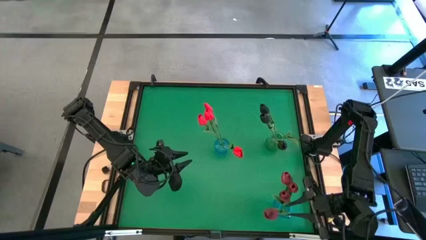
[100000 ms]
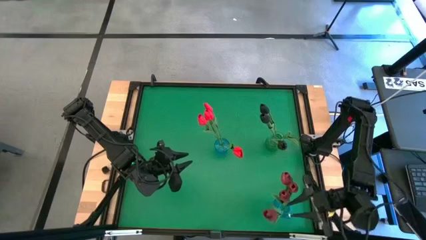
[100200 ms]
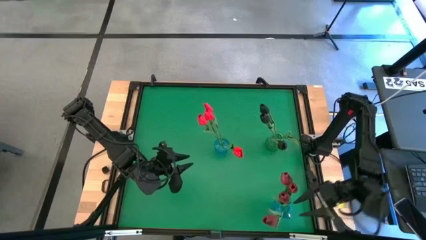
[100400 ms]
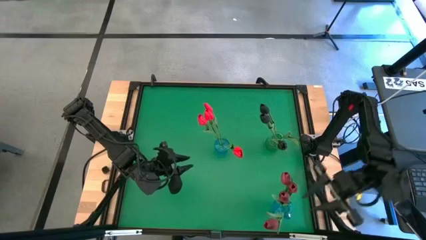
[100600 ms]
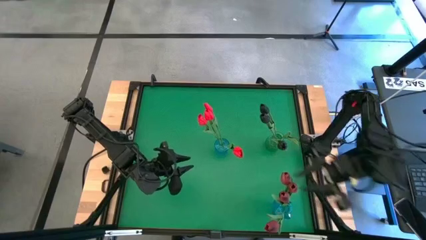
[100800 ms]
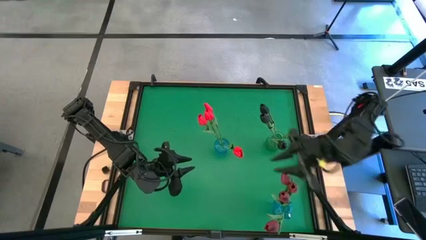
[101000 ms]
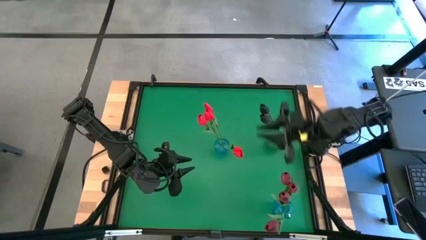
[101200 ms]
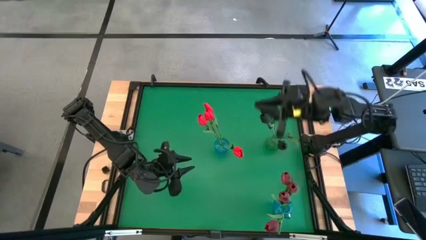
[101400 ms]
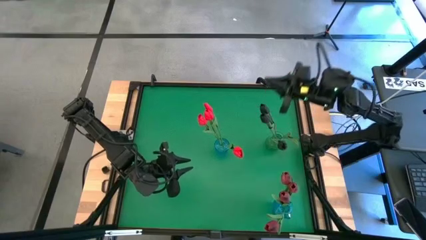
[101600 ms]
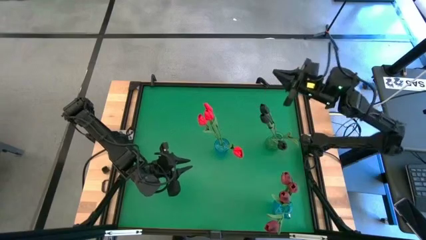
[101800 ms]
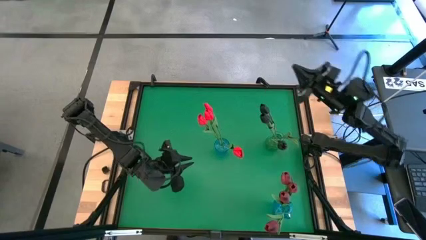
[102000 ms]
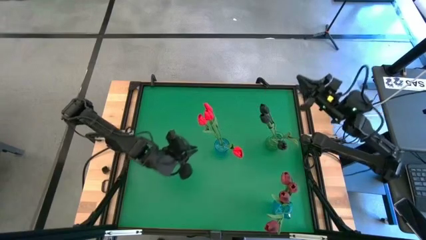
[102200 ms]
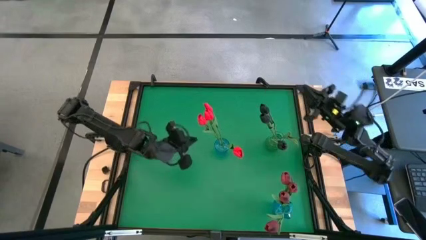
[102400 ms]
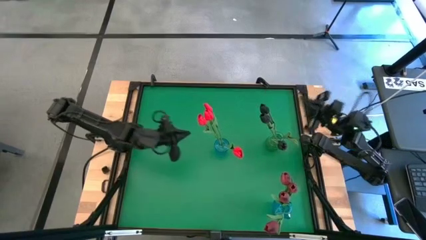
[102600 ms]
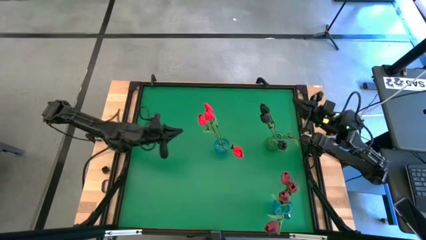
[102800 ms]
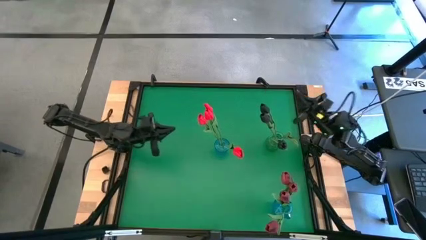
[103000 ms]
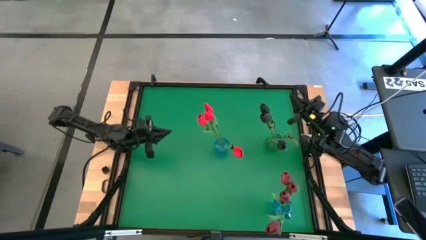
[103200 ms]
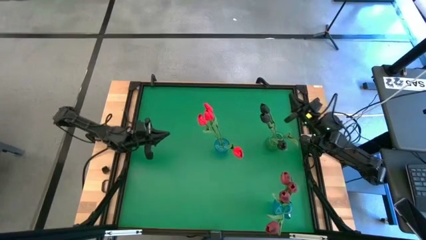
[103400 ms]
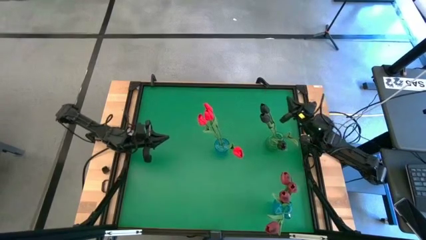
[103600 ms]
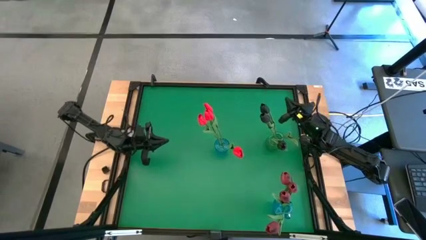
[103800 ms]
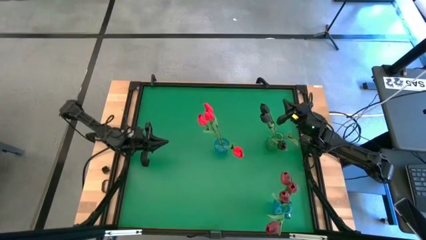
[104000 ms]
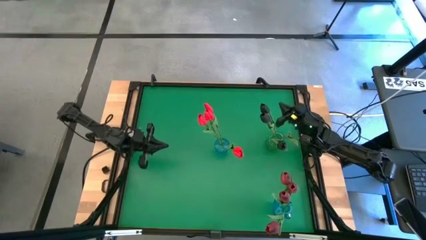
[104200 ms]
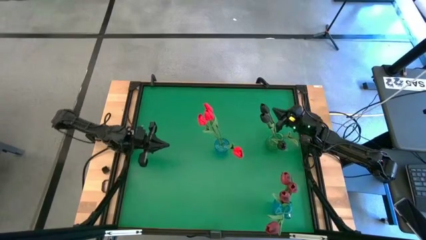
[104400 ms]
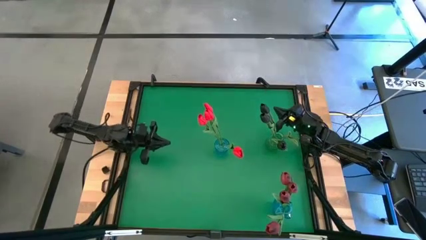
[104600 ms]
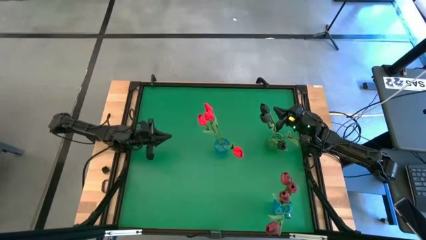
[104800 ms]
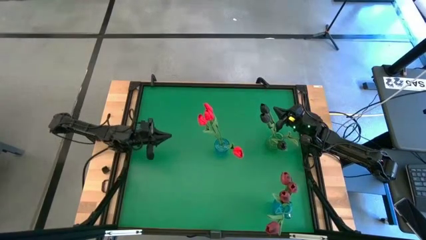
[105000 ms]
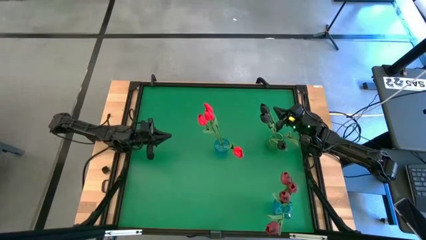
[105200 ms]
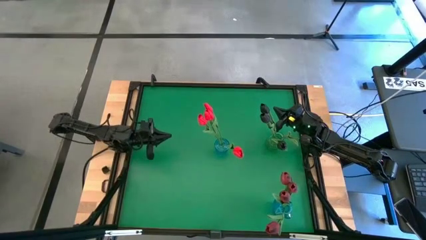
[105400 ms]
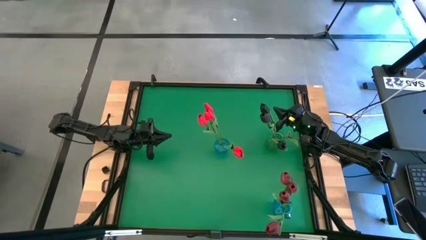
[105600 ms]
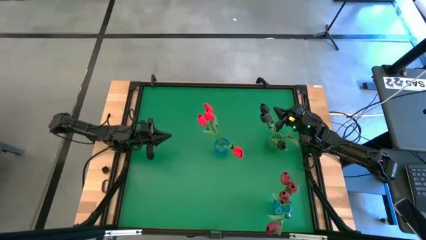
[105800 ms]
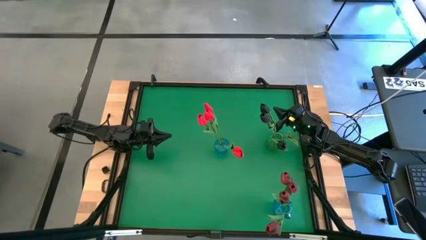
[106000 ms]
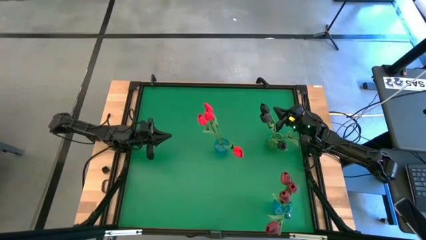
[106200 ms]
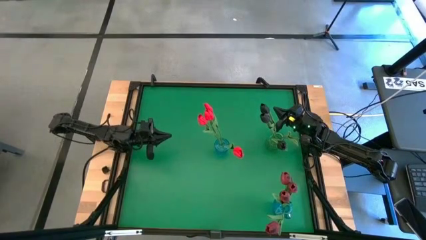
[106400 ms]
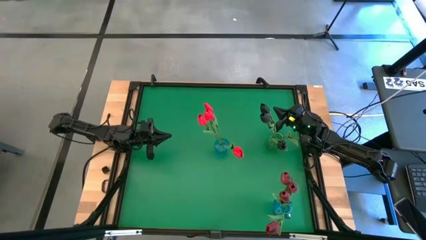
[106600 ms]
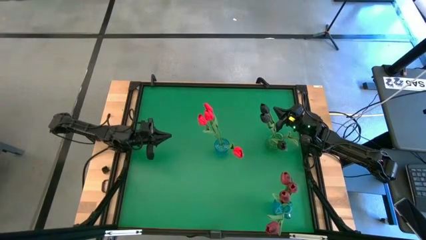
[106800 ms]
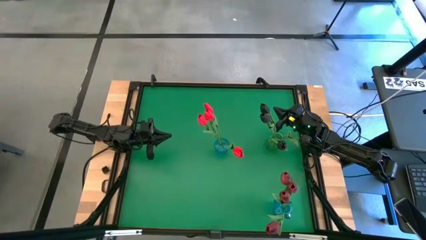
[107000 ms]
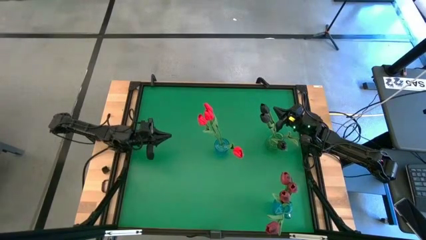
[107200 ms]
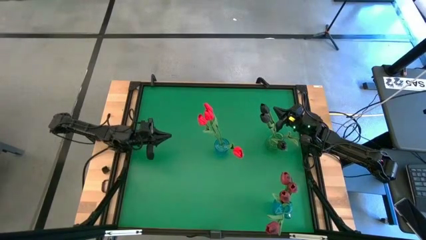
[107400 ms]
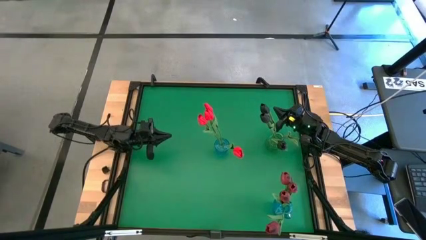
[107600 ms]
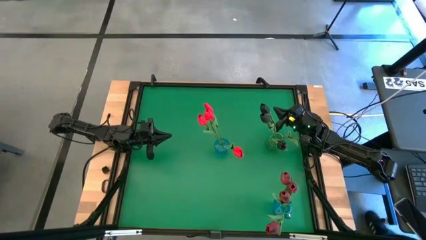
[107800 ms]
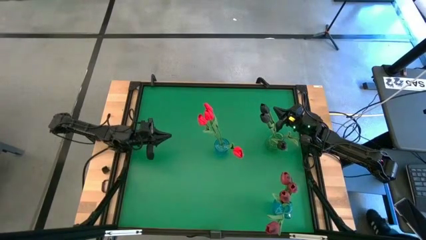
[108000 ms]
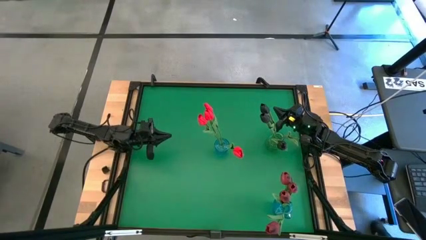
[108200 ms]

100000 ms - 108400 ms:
Task: Sort flowers into vase by color
Return to Home Position

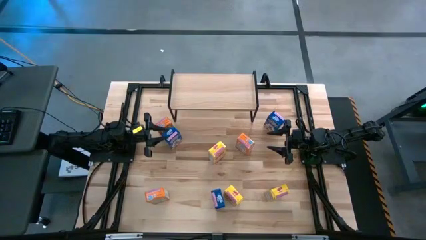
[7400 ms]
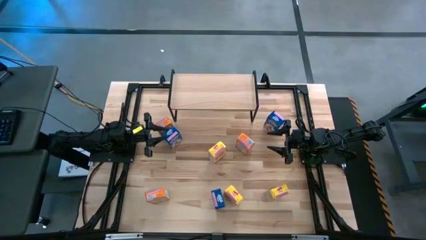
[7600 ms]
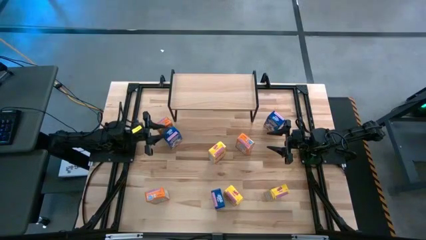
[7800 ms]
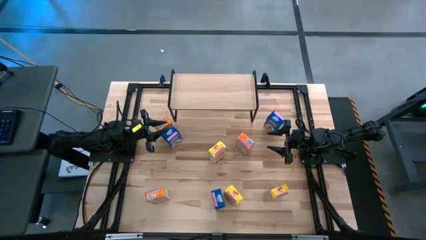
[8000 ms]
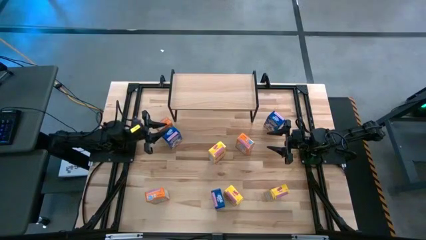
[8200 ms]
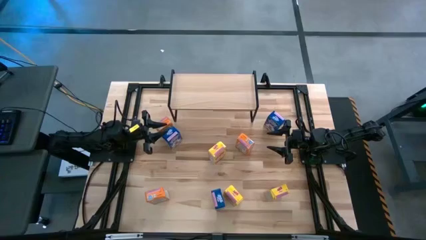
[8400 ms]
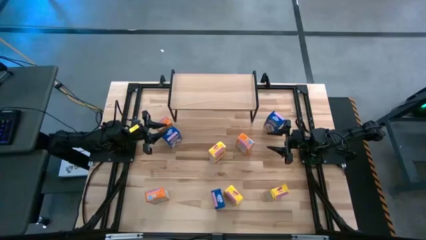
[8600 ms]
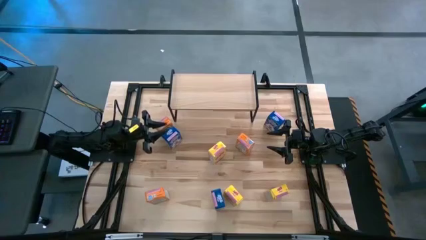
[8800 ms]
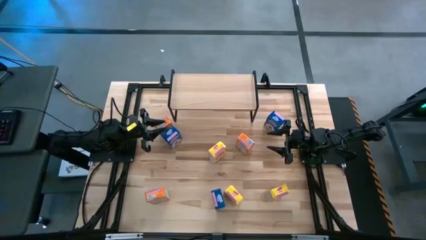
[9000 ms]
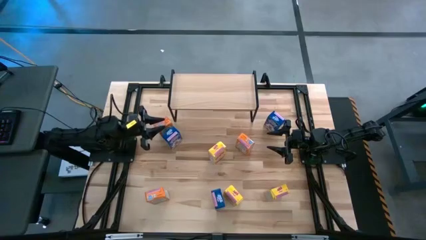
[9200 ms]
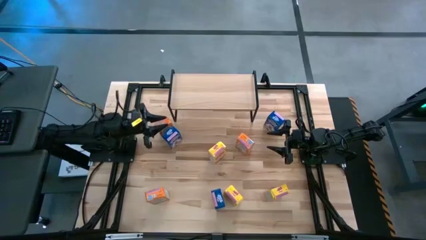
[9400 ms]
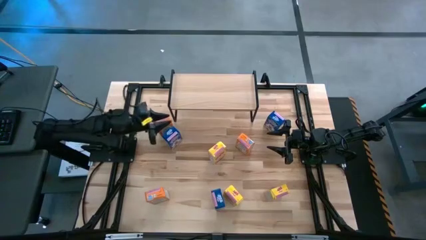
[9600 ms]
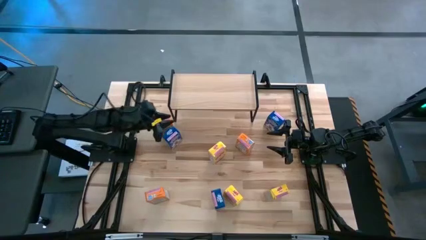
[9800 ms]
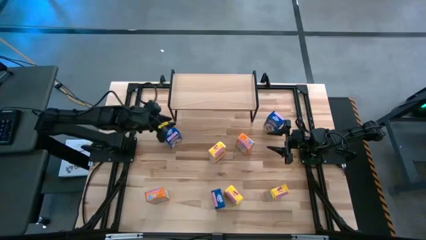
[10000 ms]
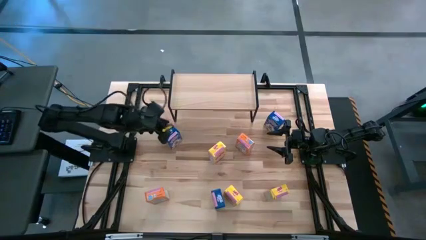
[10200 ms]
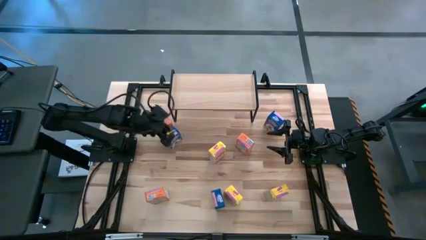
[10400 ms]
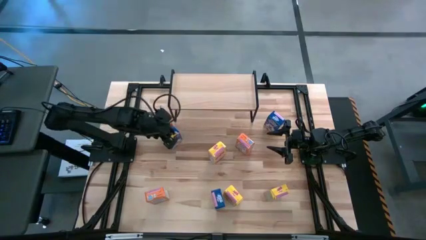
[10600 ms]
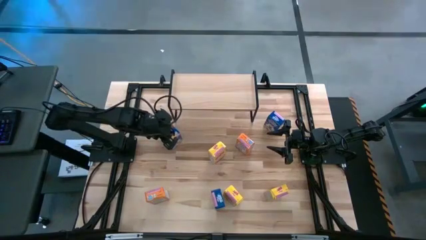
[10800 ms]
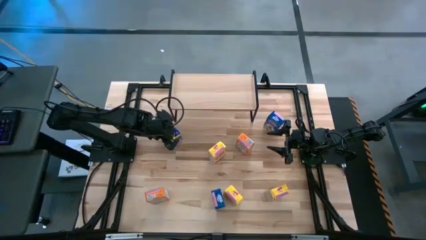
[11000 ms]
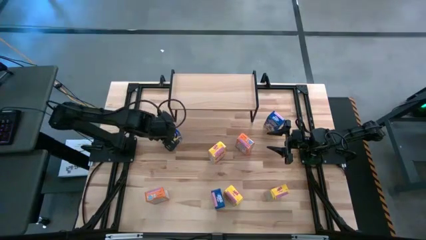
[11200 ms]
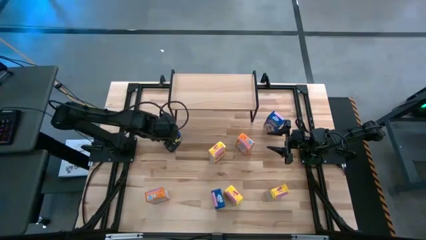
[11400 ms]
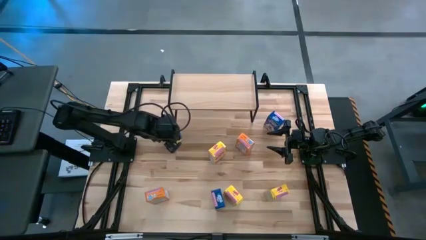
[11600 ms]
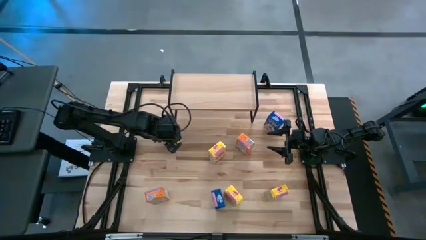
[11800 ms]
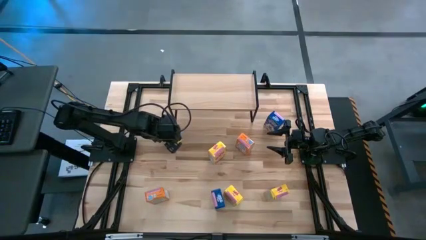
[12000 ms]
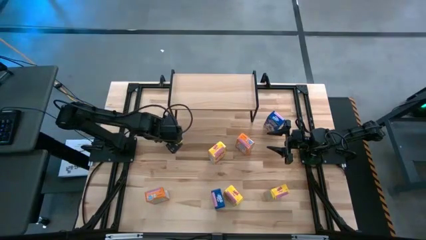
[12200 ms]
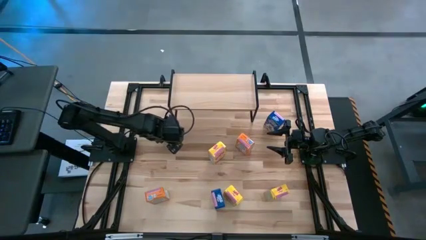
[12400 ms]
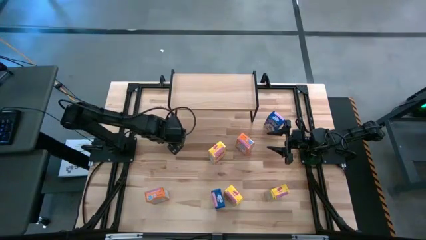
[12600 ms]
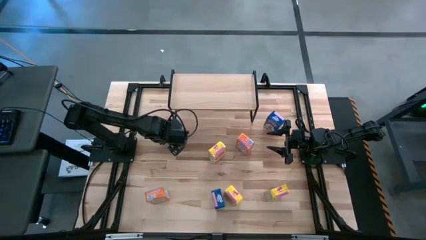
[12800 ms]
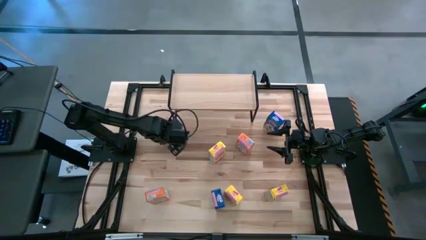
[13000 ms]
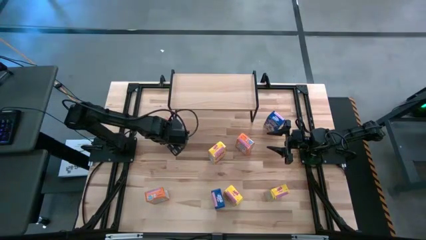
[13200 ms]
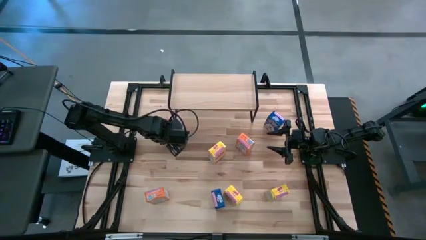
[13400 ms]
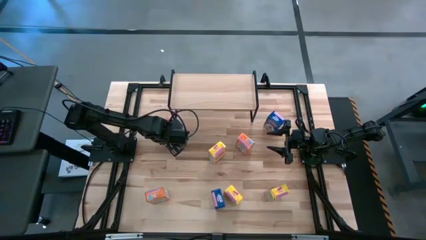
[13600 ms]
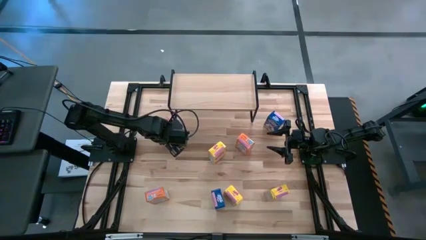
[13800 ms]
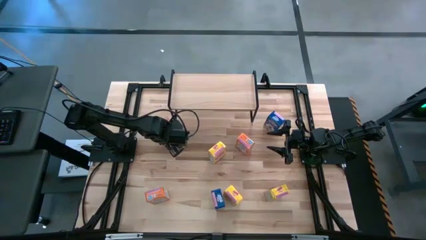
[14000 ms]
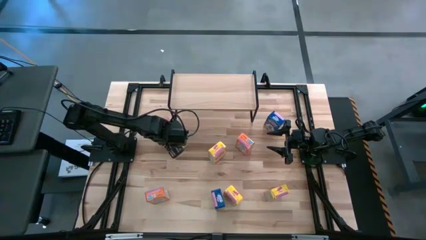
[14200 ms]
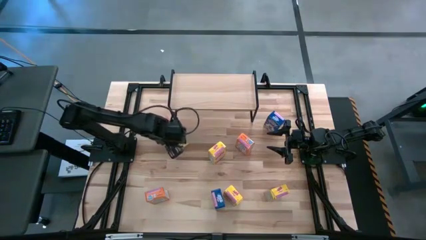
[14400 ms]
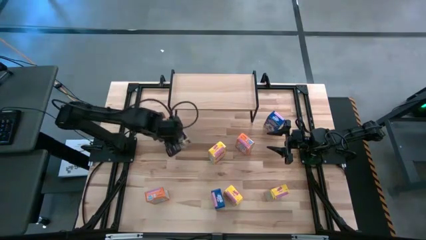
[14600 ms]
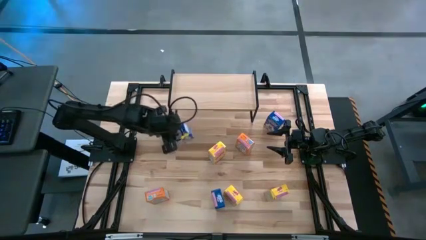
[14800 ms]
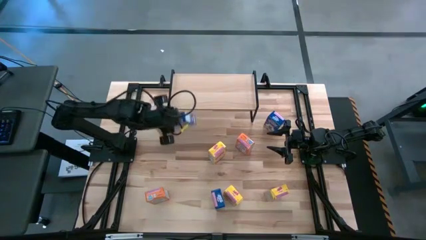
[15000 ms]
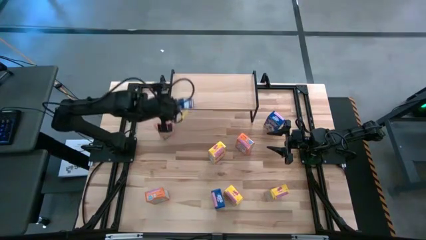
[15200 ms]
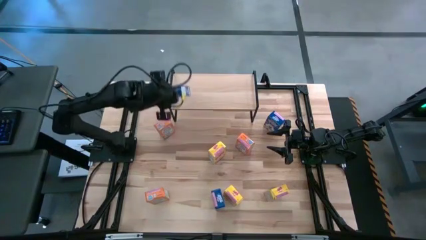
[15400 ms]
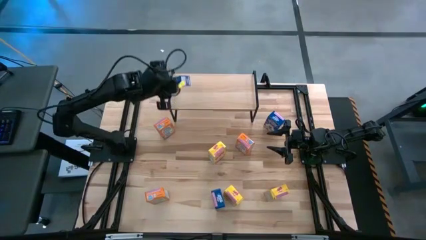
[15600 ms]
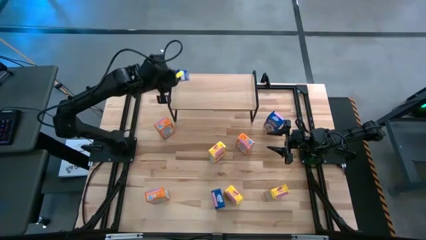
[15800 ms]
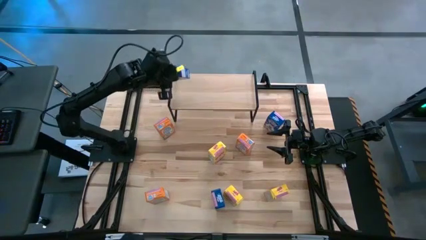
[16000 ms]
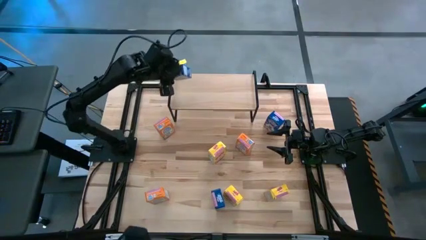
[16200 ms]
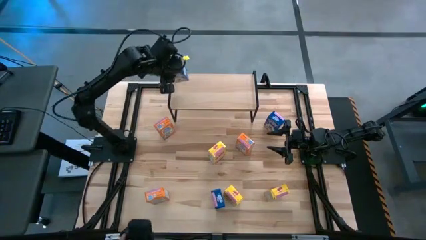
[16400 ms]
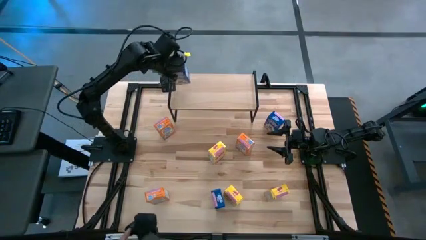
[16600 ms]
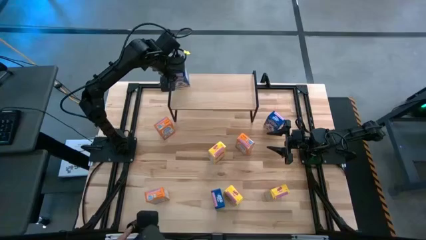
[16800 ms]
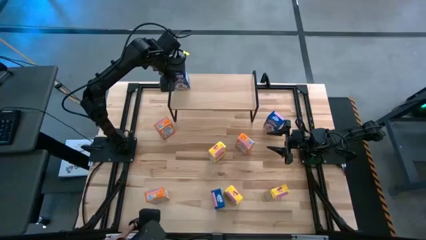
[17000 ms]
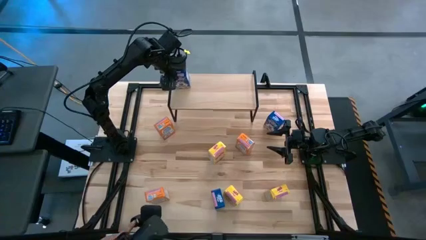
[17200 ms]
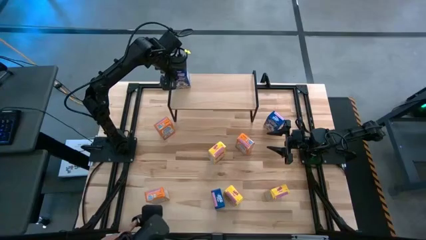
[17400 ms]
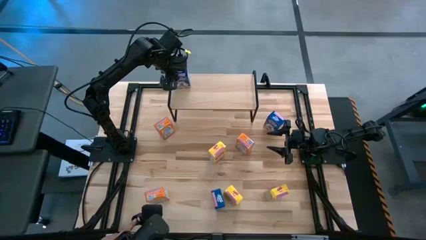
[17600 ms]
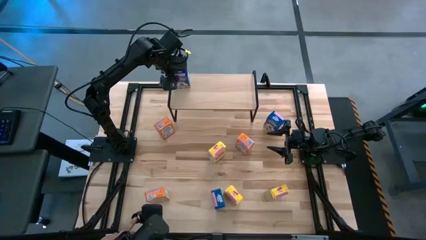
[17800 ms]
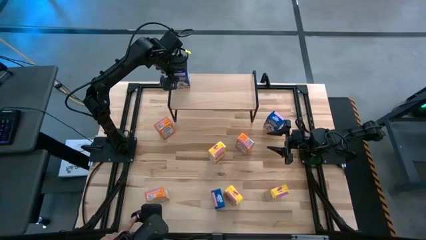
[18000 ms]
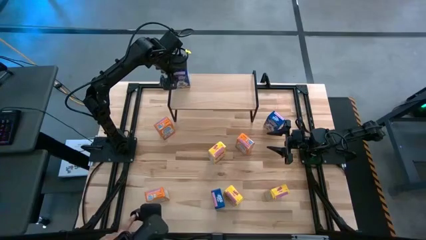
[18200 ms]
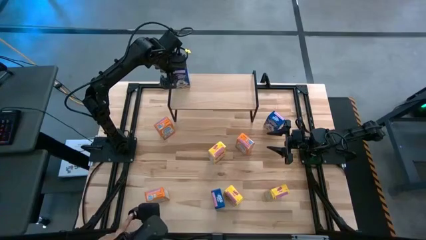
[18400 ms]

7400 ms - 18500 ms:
Task: Stack cereal on shelf
Put the top left blue cereal box on the shelf
